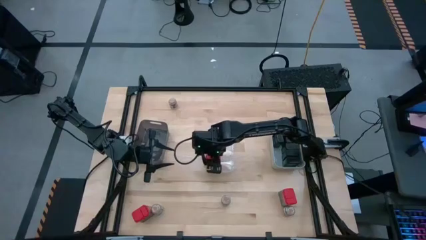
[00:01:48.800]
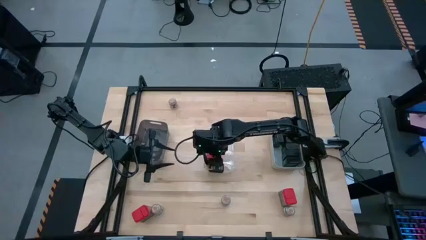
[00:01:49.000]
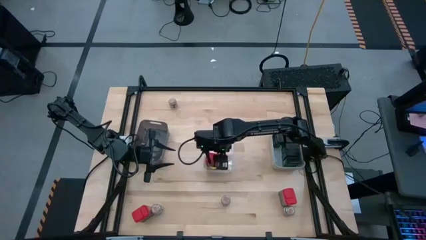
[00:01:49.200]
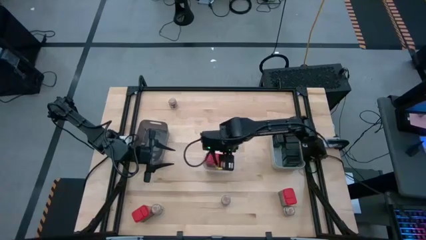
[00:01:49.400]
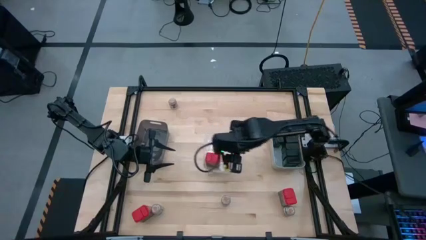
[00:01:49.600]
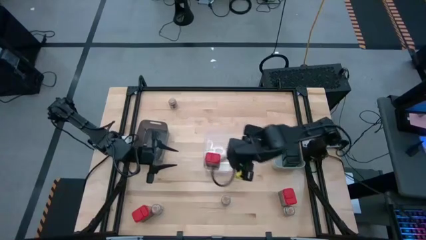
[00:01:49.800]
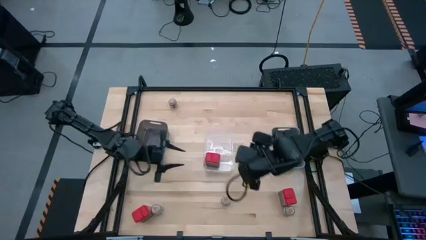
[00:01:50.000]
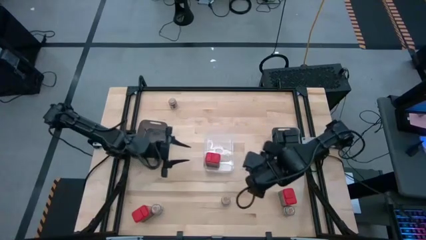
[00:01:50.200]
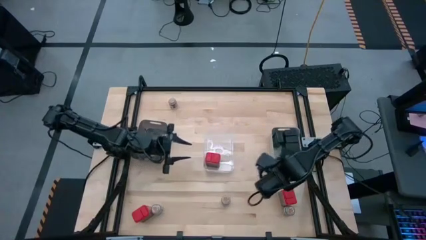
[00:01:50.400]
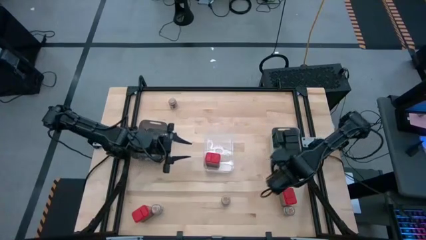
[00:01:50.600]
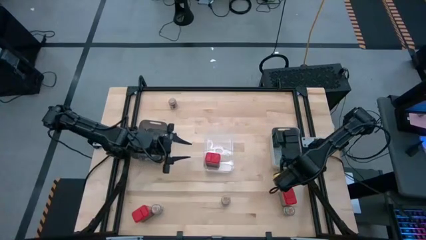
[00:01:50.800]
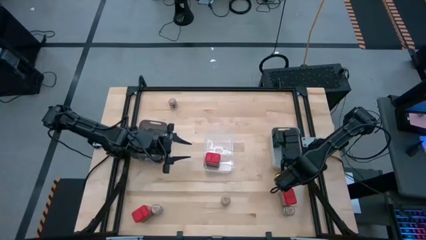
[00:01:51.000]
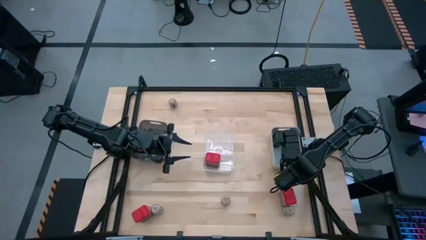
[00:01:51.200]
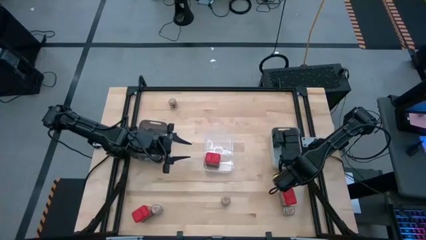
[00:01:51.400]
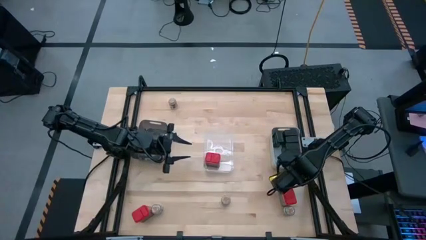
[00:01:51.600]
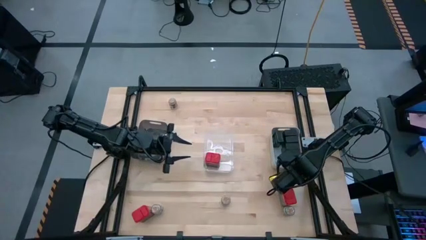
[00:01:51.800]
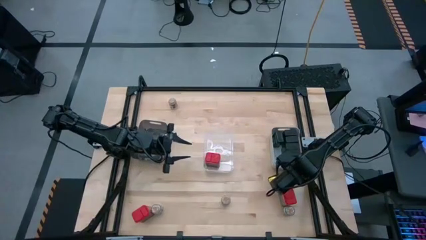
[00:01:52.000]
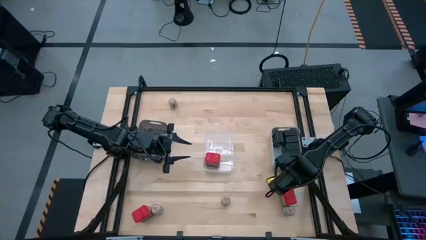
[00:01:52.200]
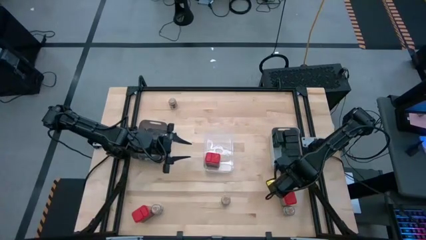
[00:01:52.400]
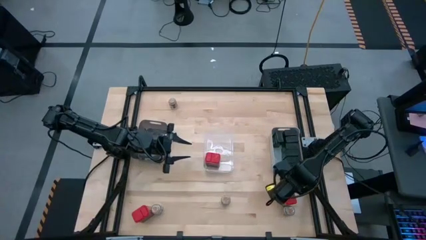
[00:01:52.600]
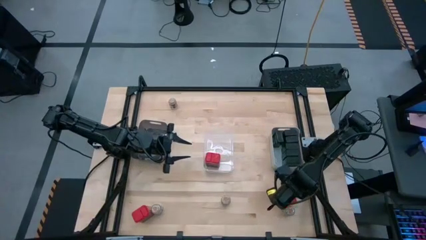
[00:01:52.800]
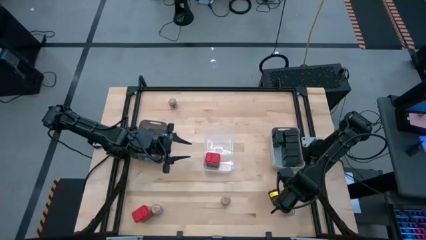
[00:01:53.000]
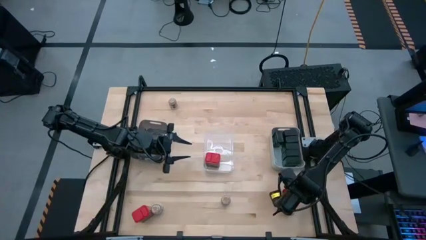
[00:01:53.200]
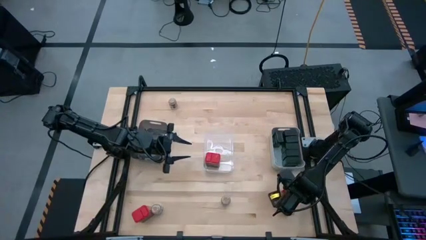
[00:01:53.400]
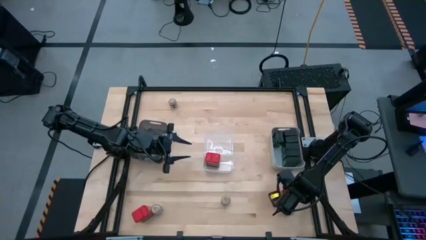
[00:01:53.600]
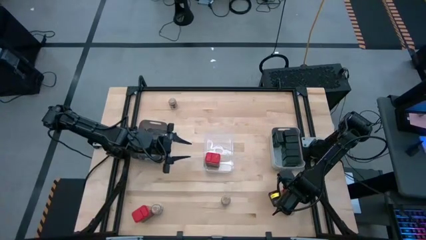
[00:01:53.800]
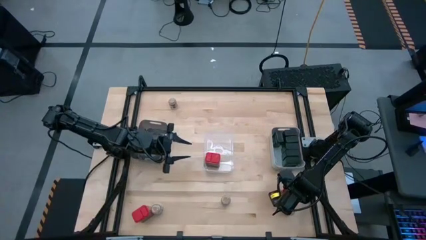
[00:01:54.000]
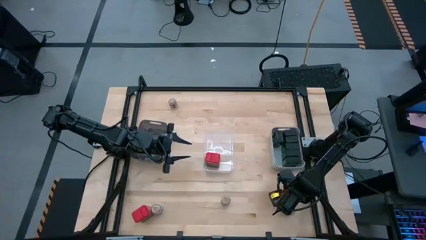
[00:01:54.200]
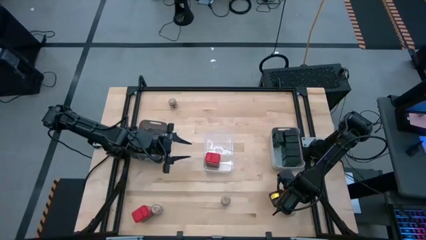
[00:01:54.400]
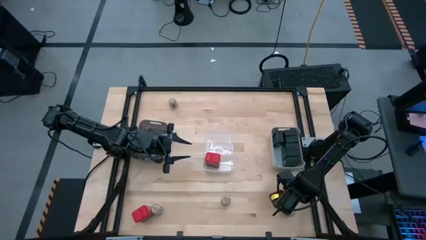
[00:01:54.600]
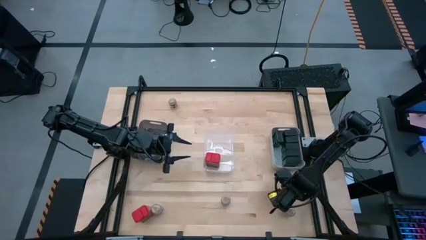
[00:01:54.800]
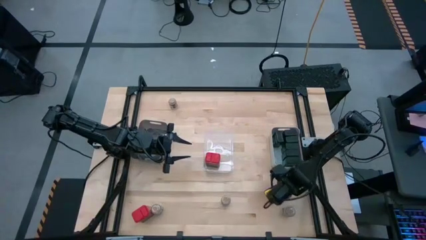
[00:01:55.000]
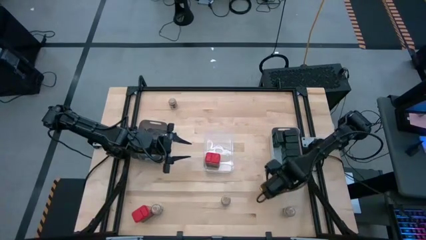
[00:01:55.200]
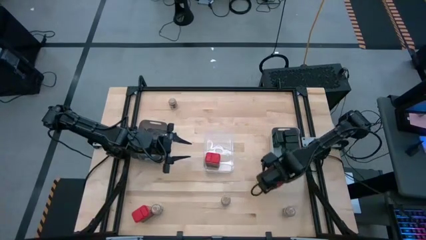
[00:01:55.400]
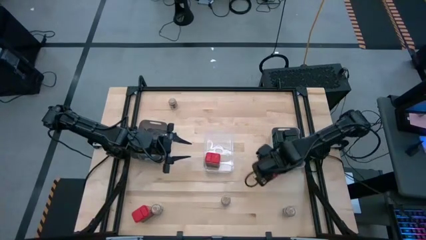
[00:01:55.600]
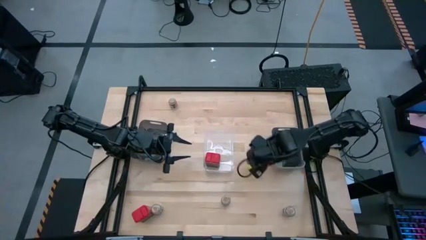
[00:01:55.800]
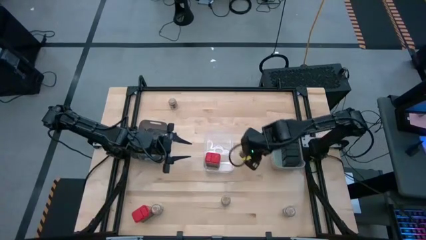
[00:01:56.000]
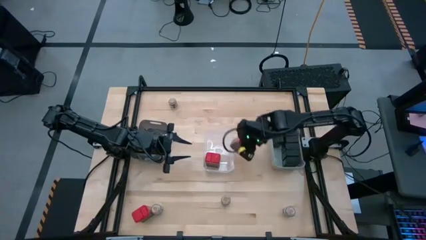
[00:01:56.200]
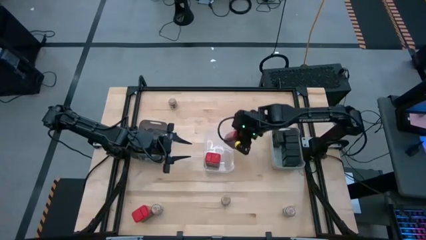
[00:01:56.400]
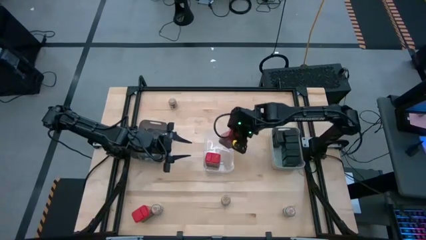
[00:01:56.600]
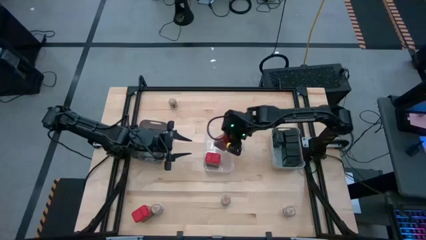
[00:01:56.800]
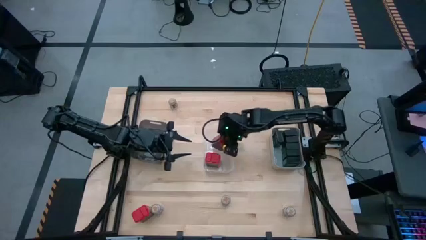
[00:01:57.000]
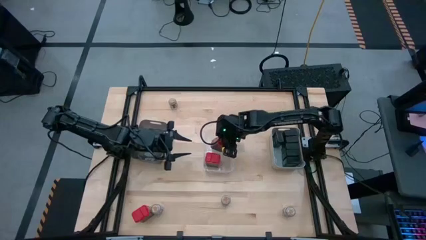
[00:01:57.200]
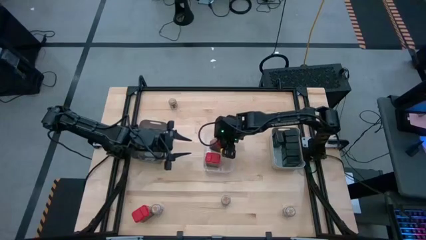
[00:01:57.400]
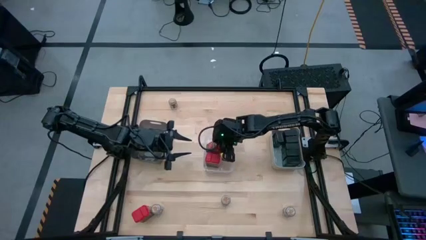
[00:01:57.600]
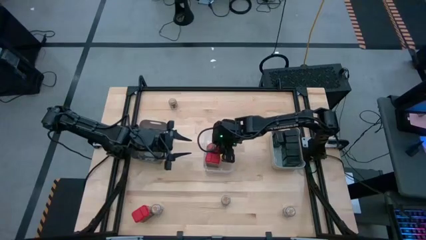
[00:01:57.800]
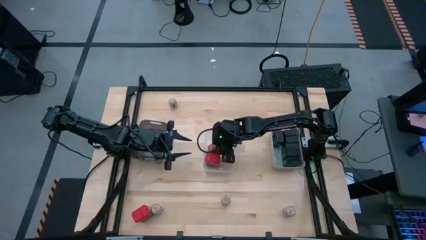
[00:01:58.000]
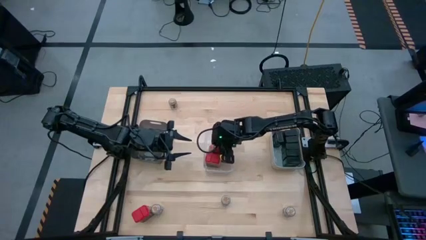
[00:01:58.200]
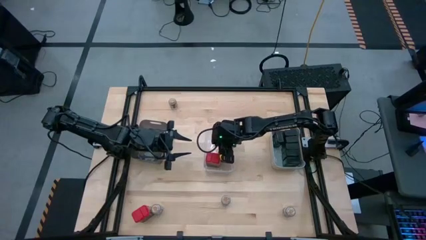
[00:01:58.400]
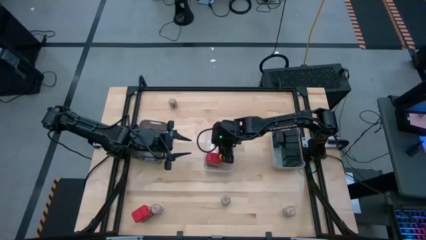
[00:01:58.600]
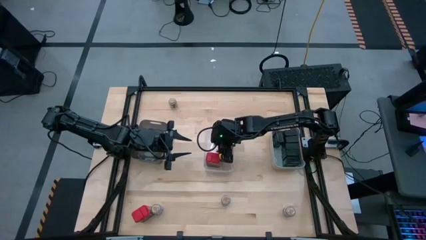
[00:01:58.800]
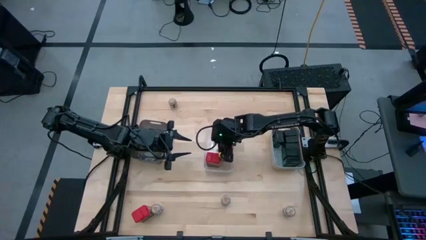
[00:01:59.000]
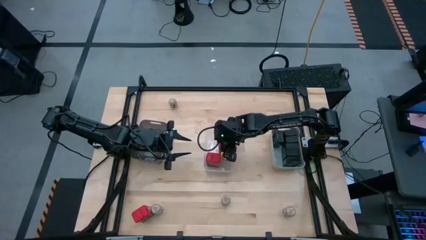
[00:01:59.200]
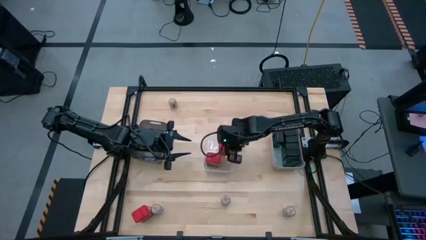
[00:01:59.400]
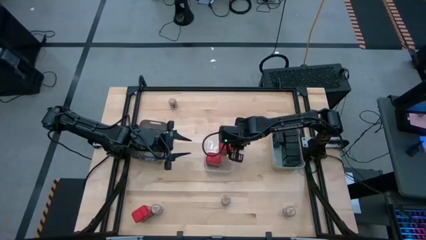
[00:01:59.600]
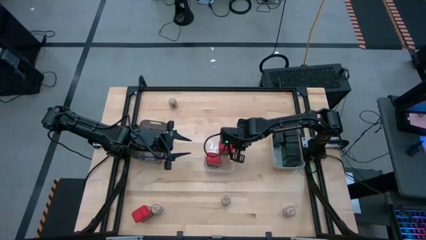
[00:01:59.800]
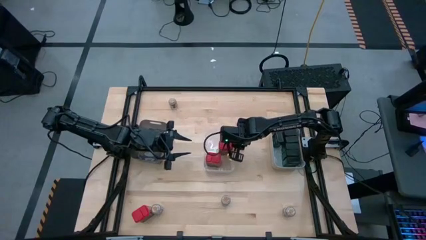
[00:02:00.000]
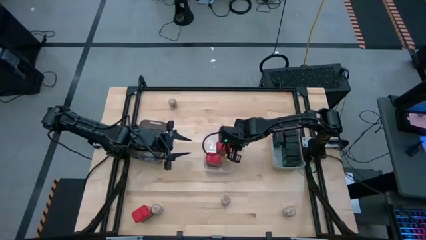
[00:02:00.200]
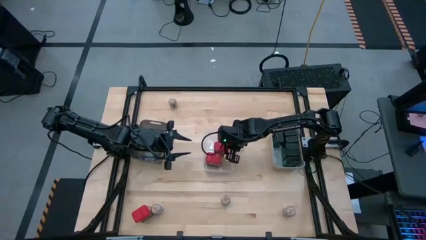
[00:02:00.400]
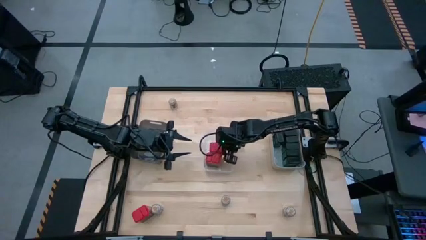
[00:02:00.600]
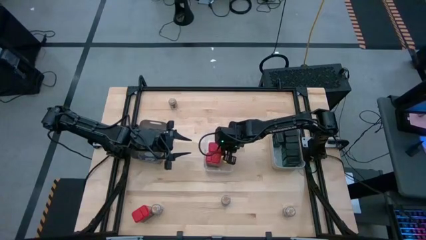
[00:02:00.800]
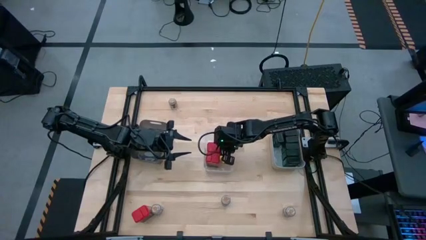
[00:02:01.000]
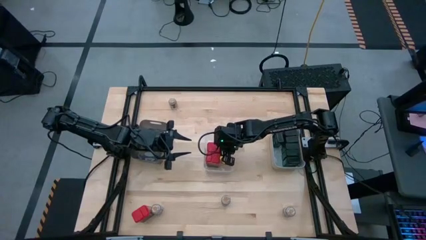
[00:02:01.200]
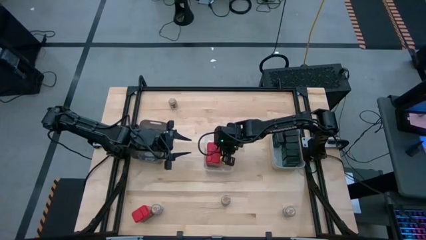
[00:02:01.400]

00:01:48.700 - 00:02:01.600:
Task: Sort spices by type
Put the red seasoning can into the transparent bin
